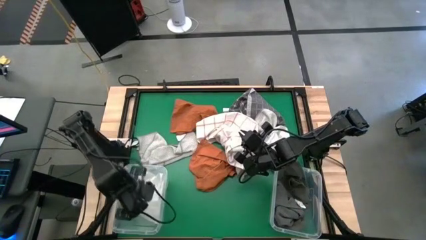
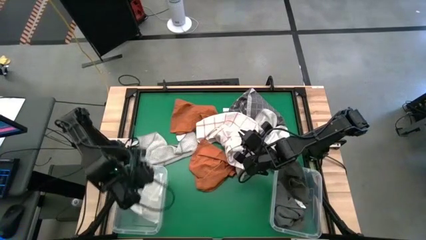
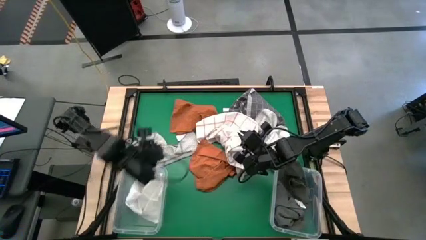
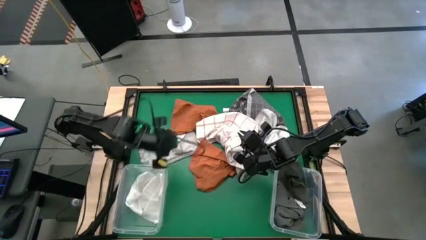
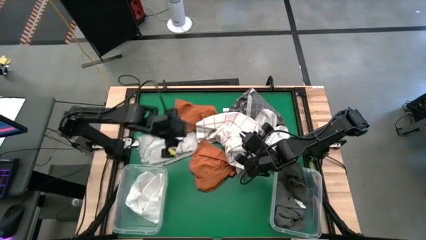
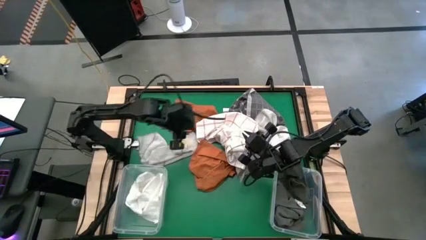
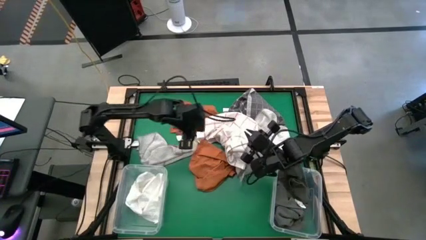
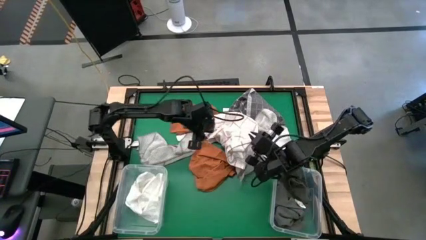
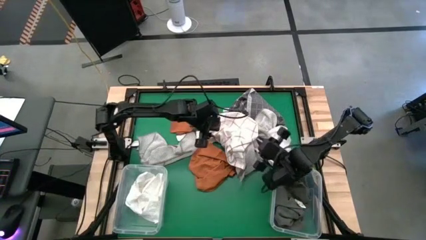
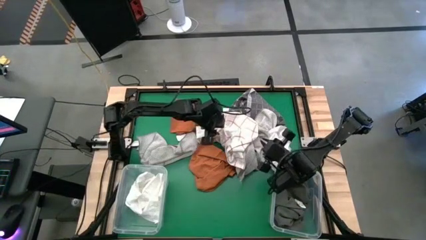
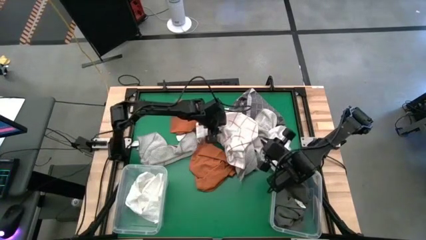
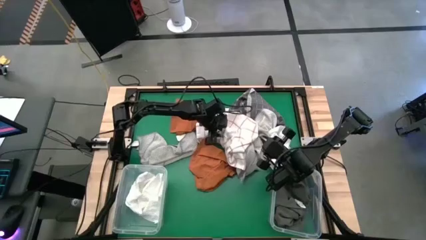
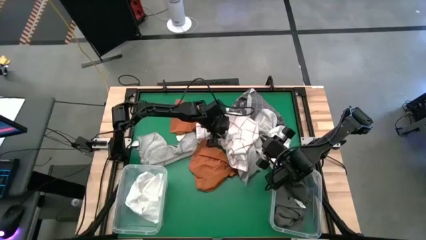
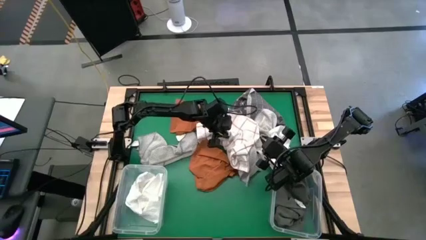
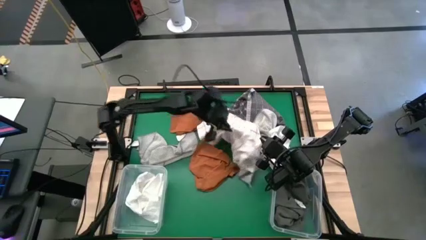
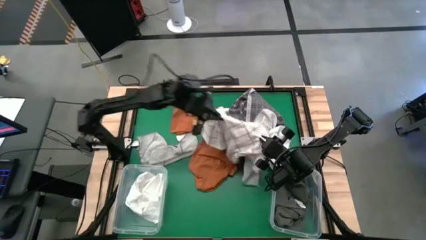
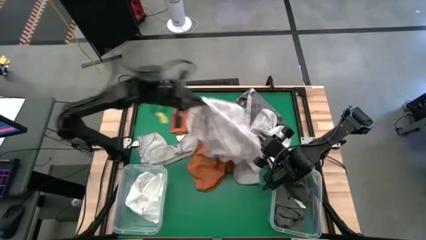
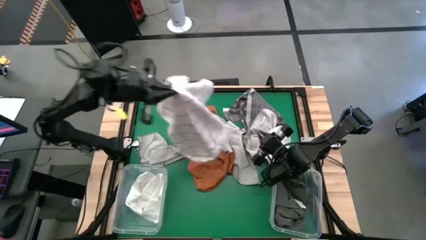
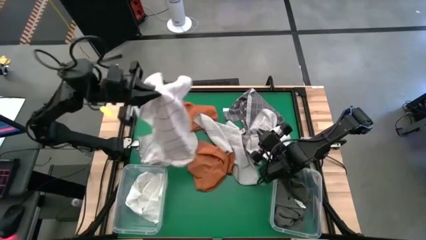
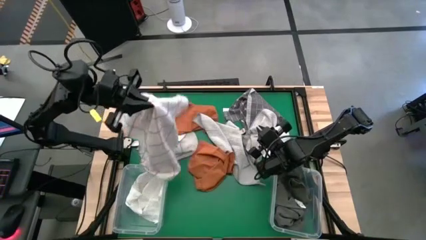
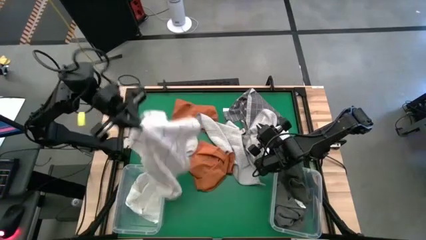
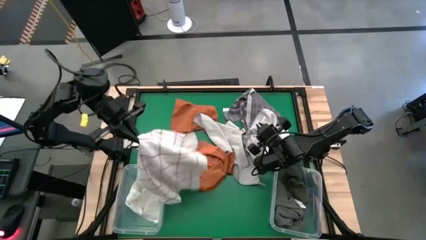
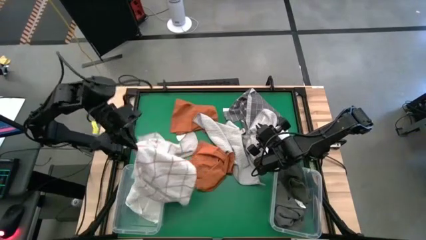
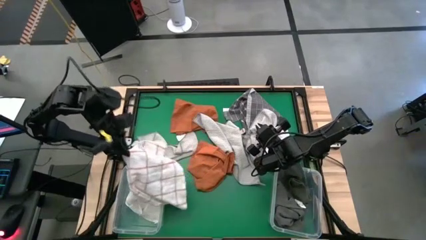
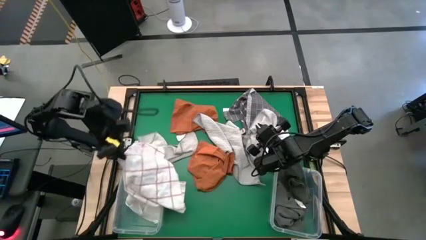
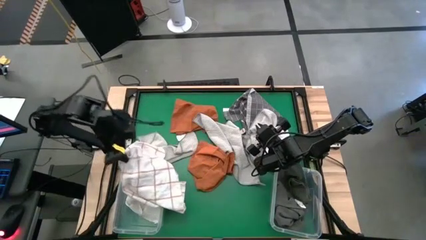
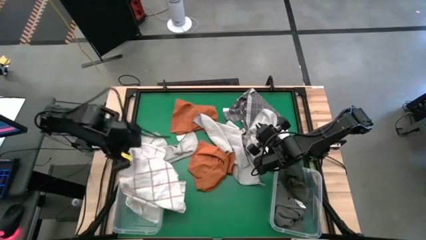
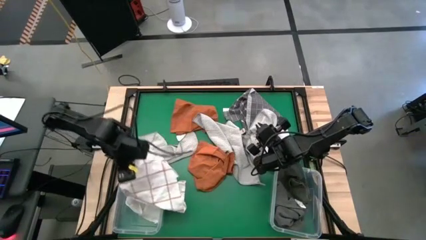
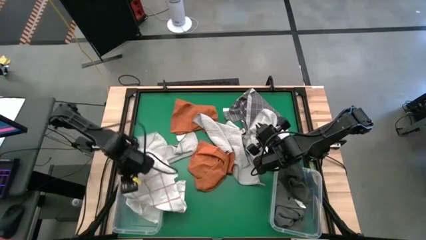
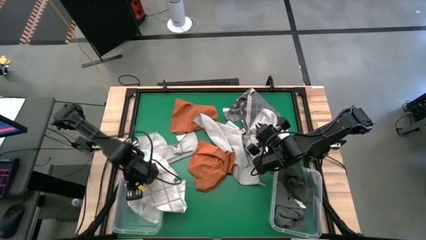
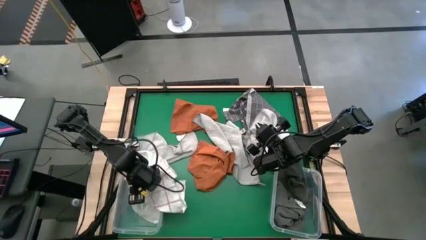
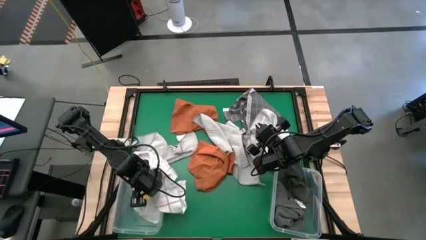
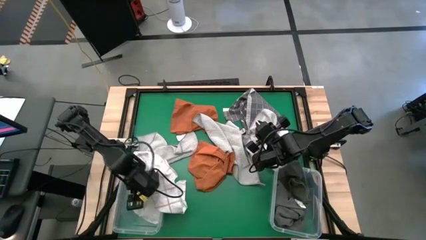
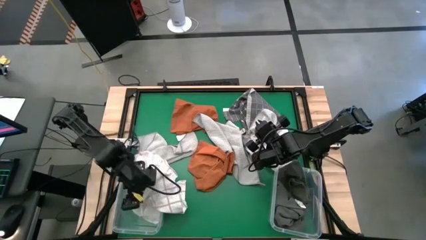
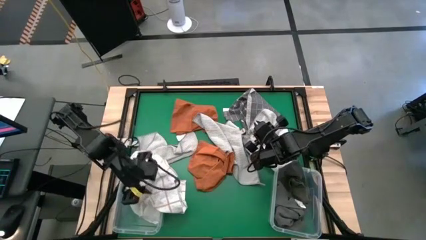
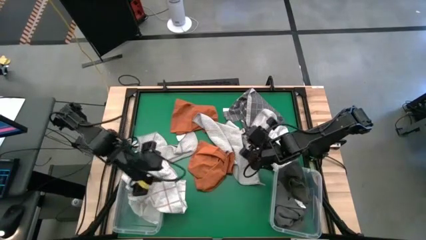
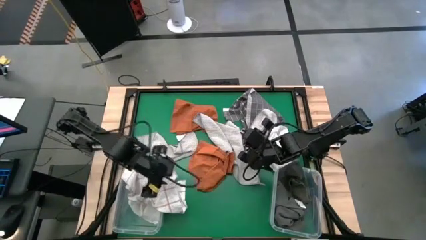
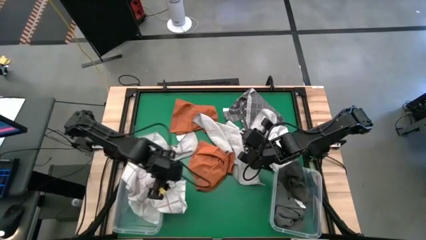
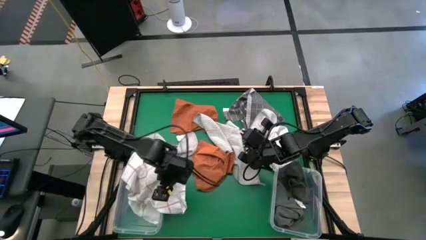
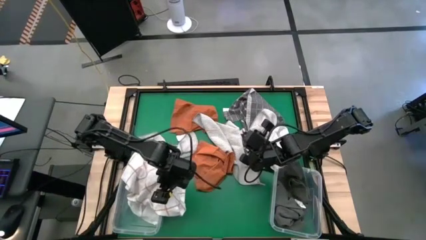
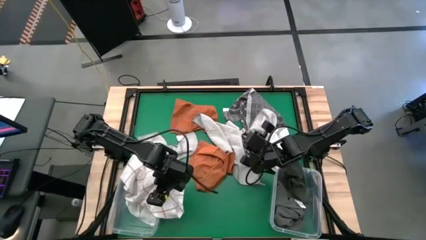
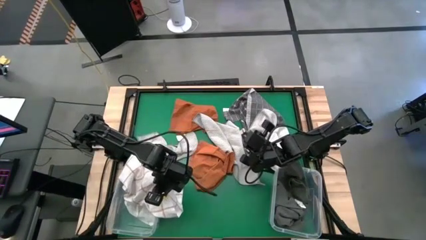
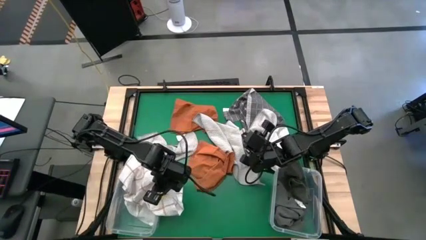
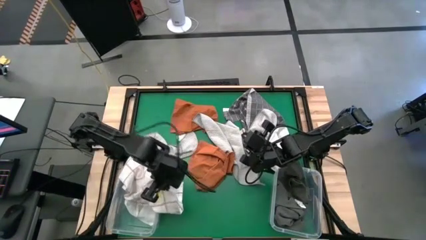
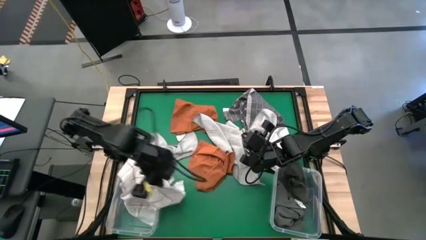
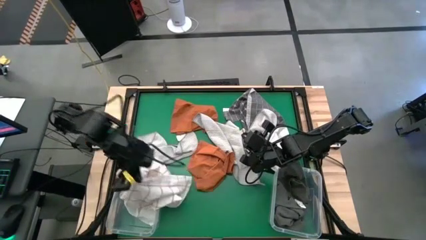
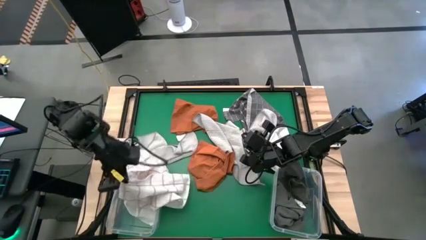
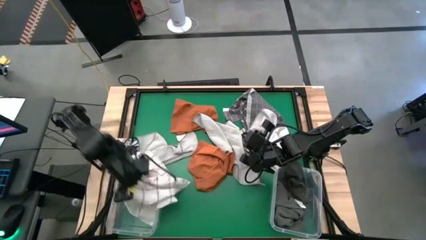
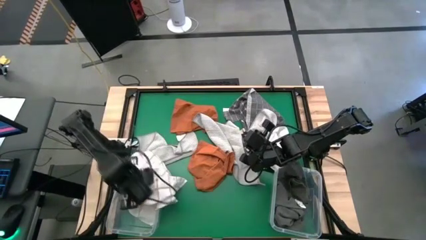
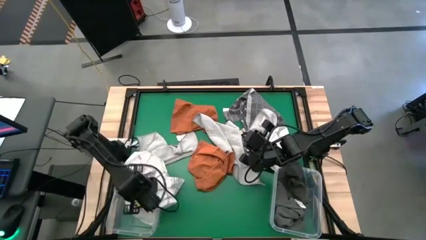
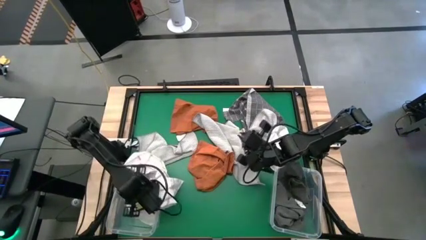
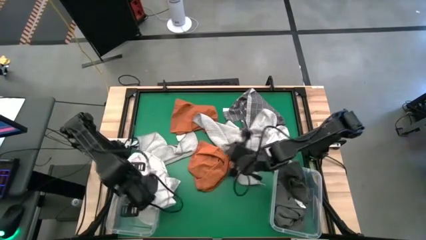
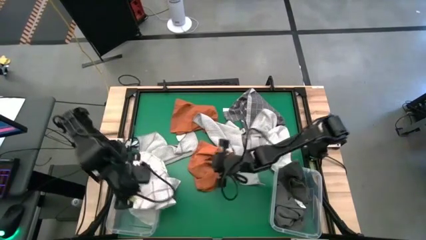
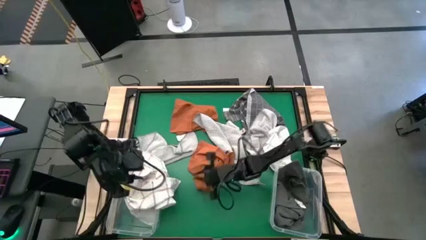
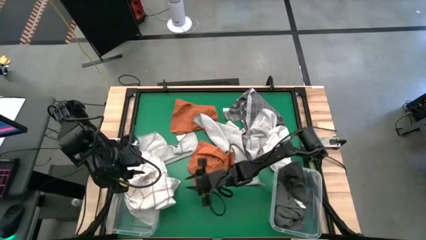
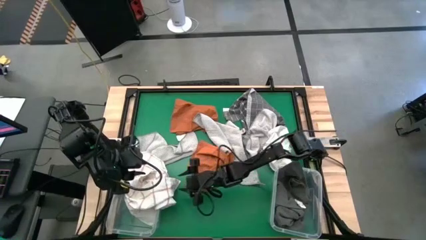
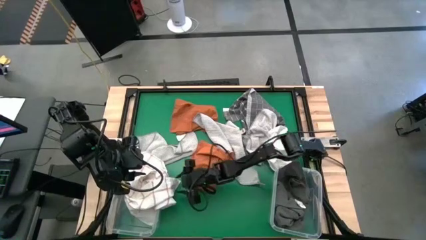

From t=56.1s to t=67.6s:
Task: Sort towels by color in basket
Put the white squared towel into the left transparent bin

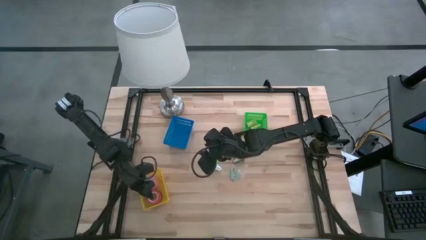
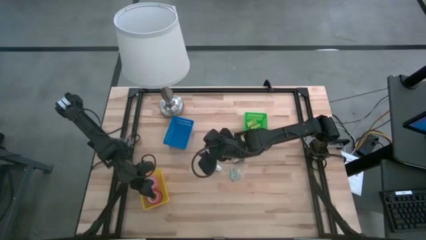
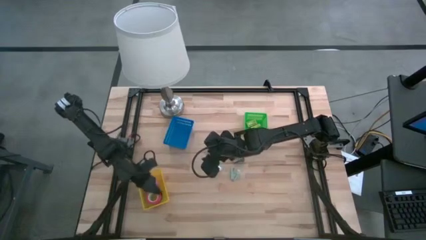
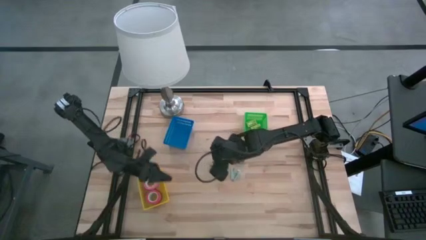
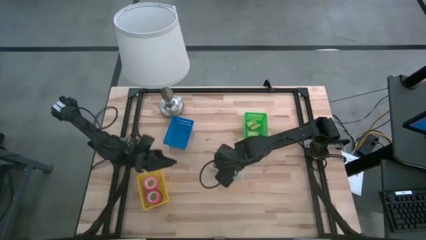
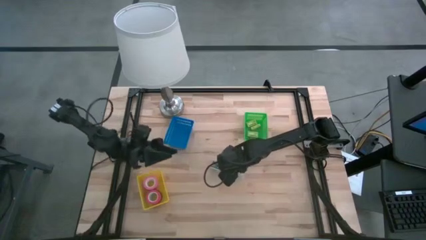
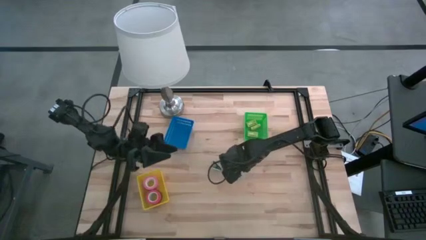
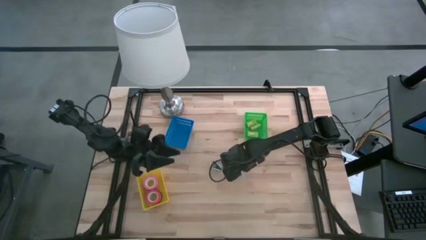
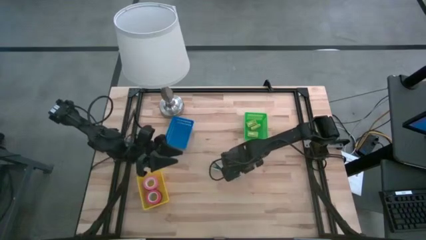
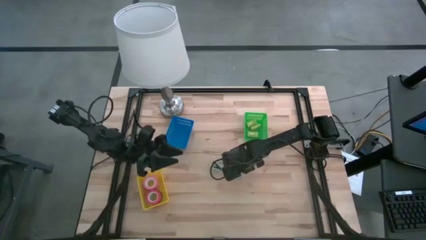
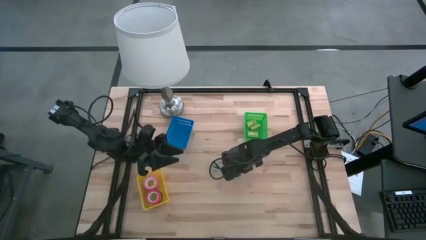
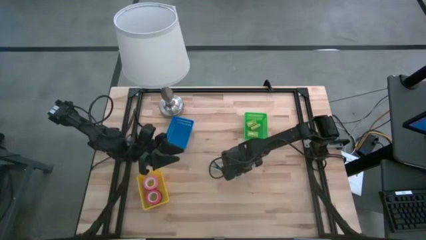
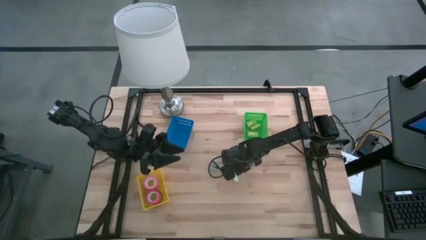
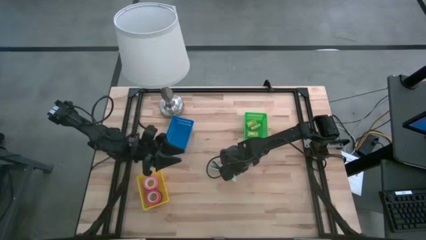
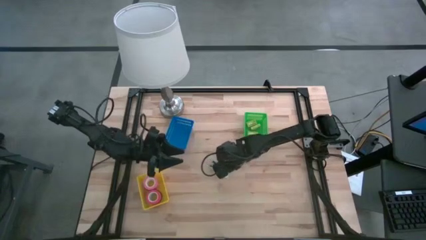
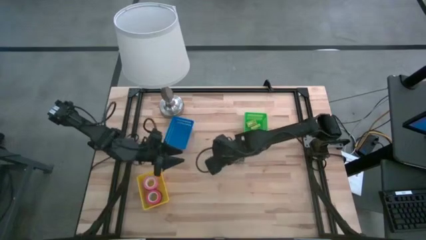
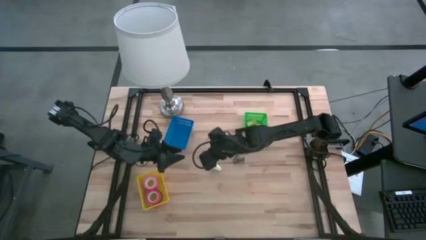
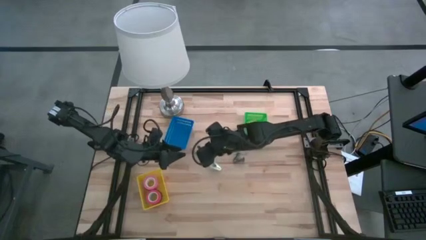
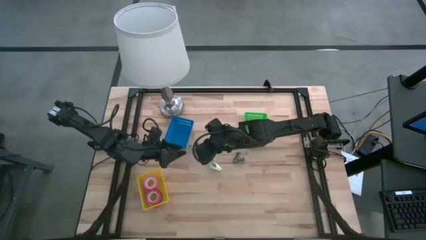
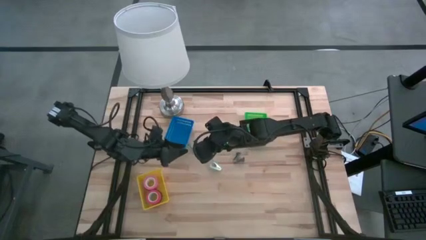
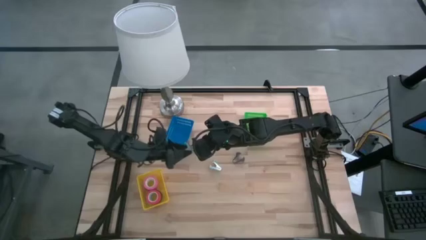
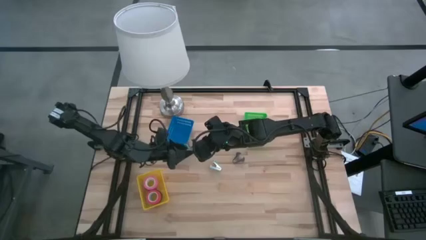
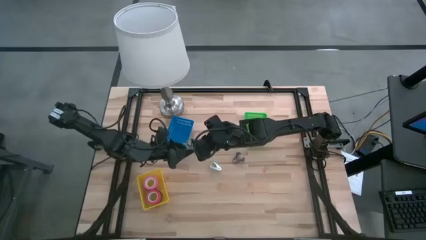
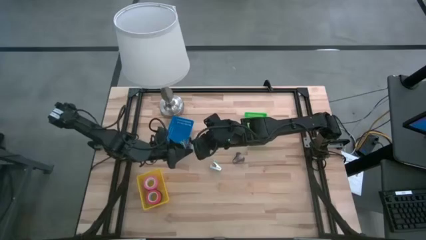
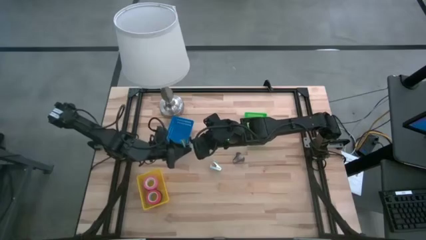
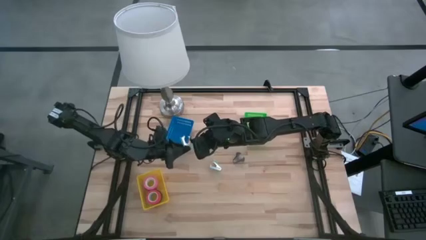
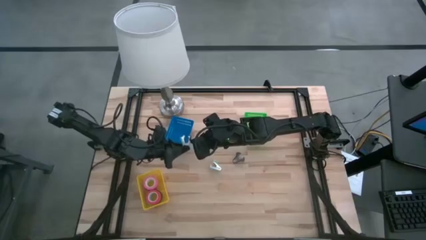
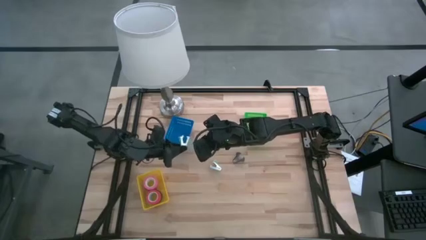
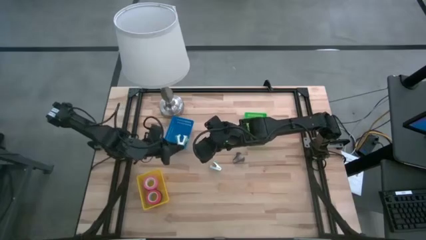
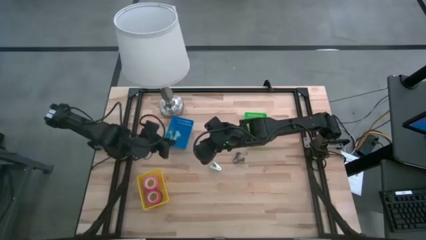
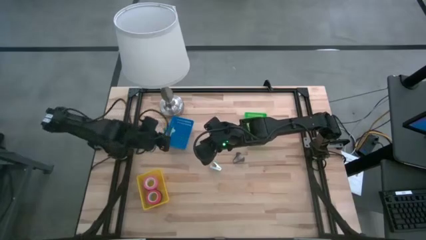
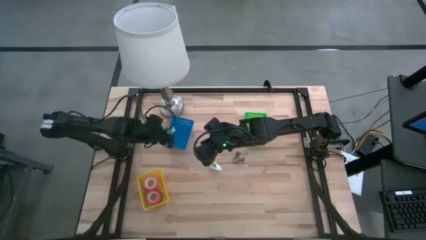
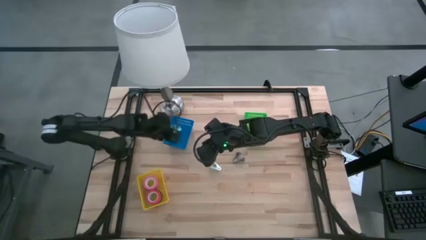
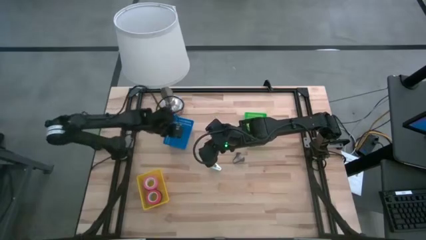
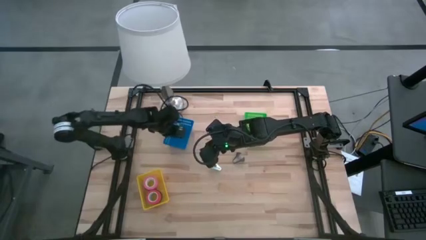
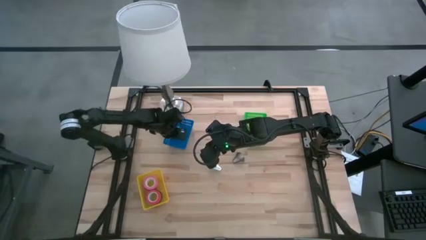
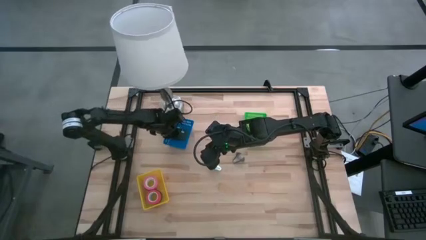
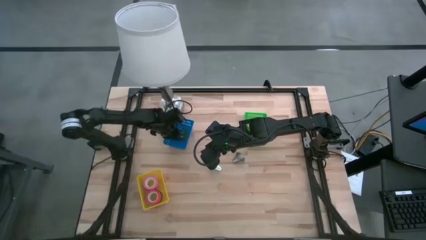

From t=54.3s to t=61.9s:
Task: Pick and place Stapler, Stapler remover, tape
Put the right light blue staple remover into the blue bin
